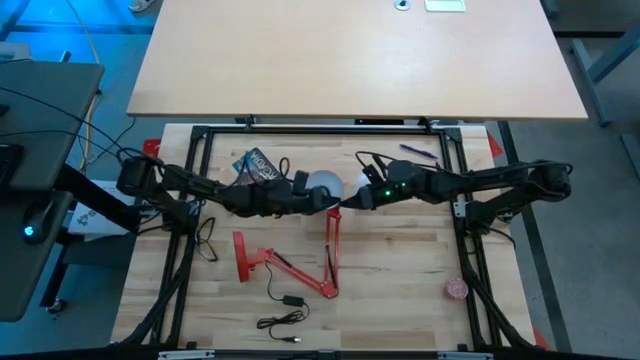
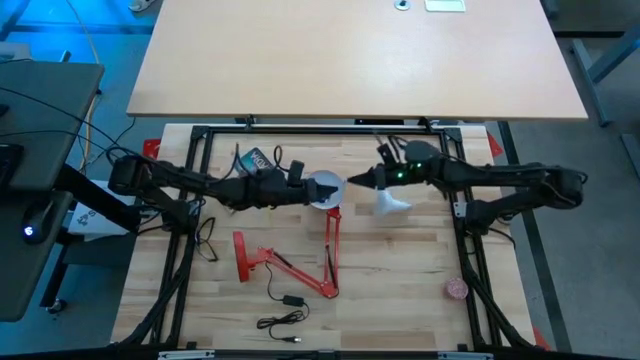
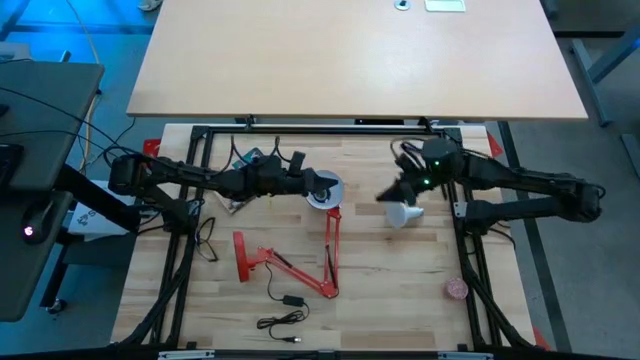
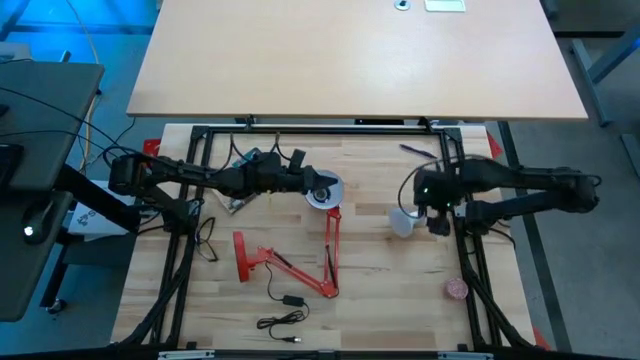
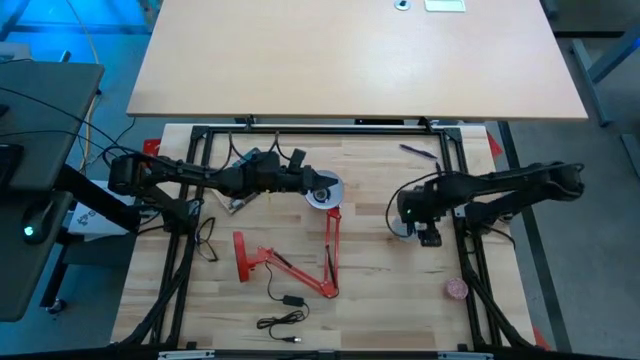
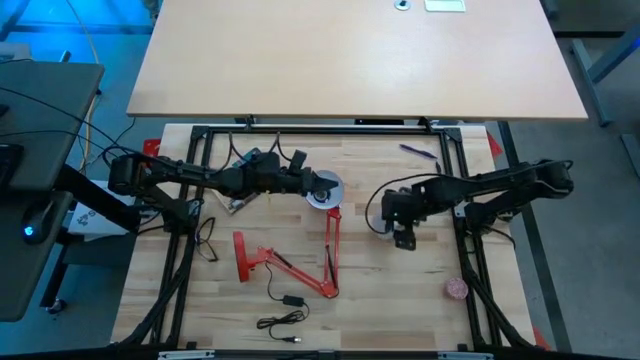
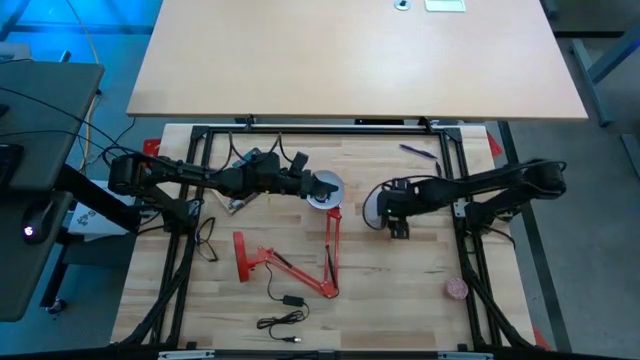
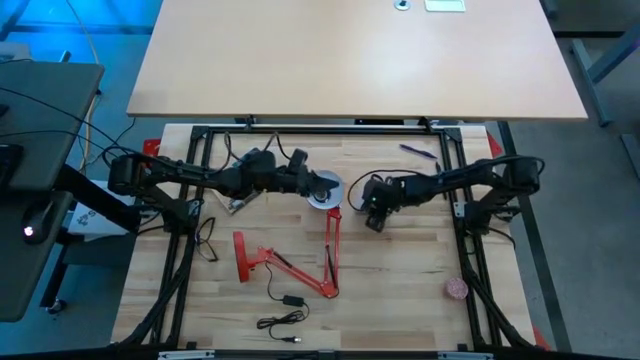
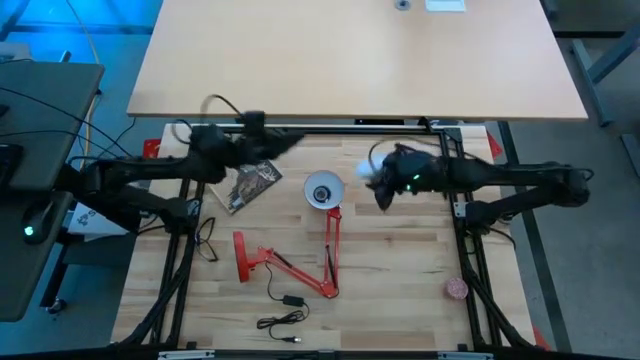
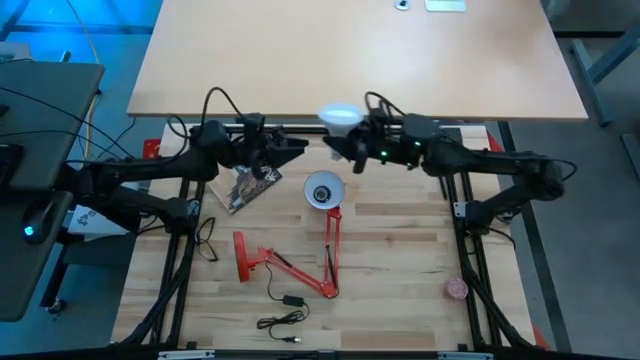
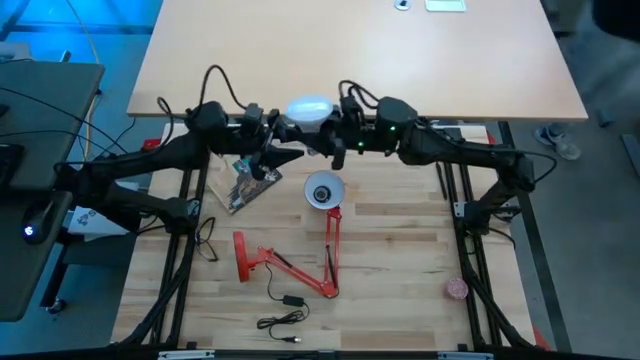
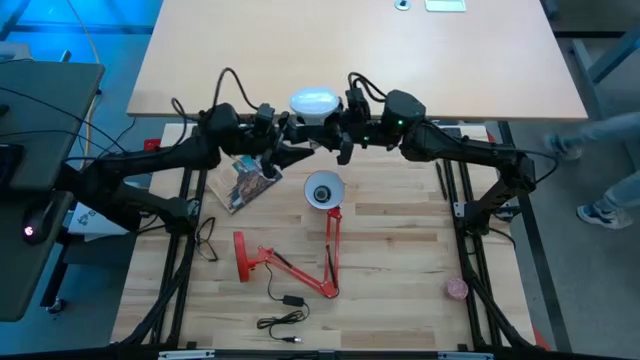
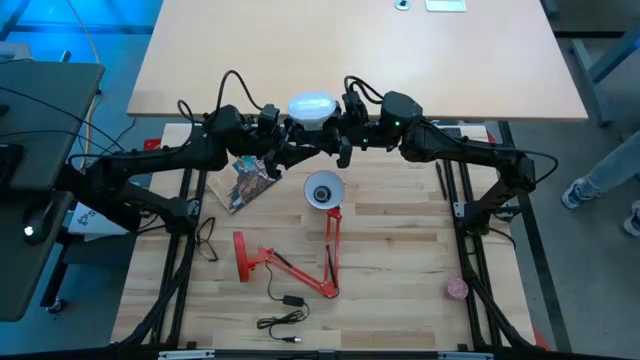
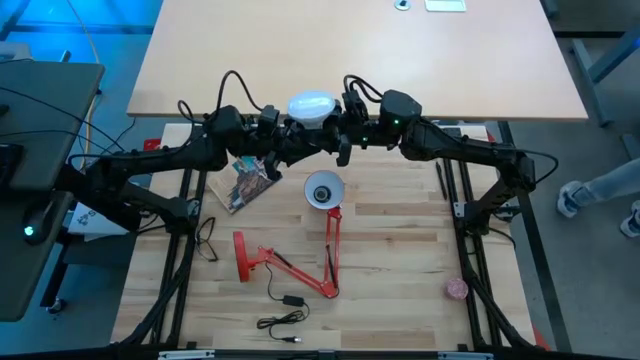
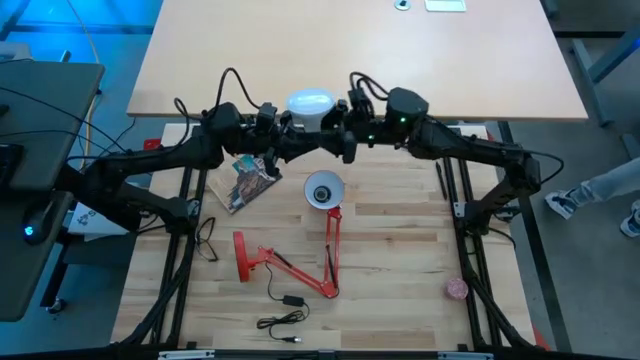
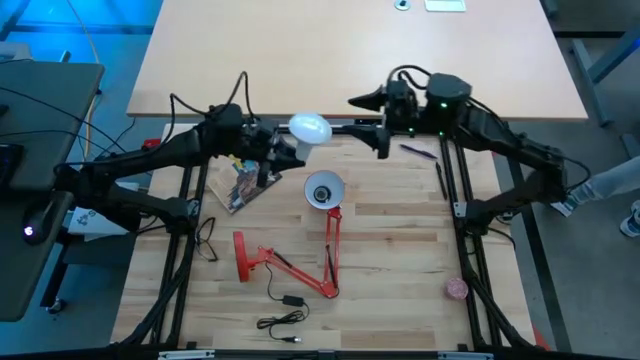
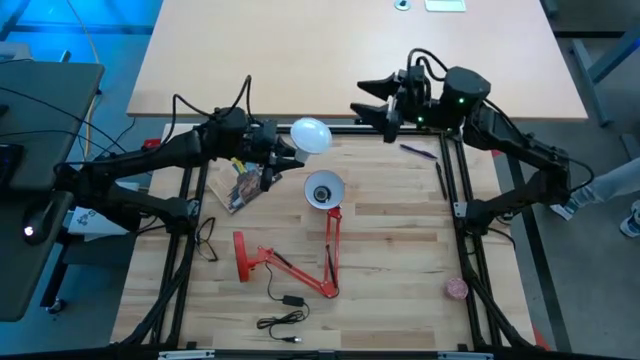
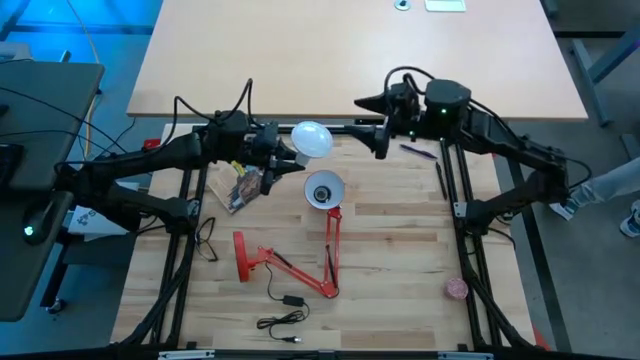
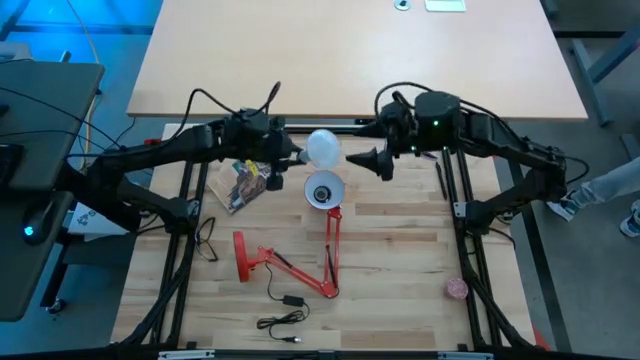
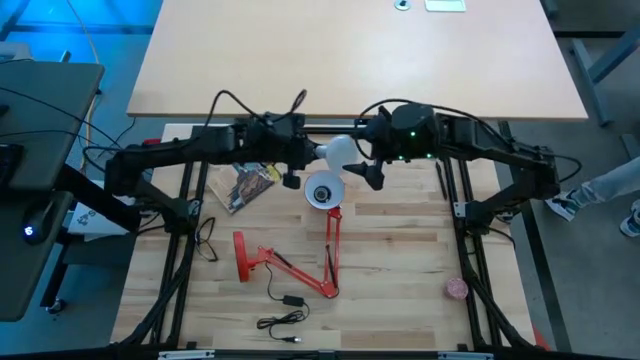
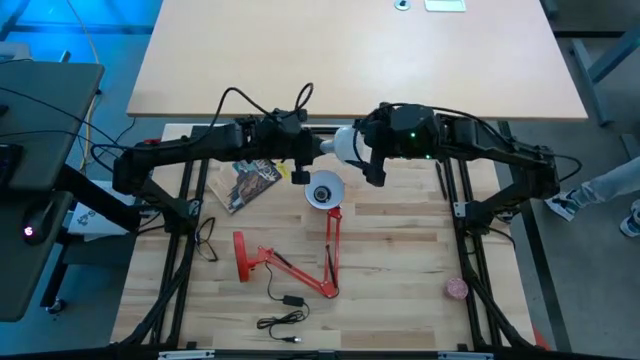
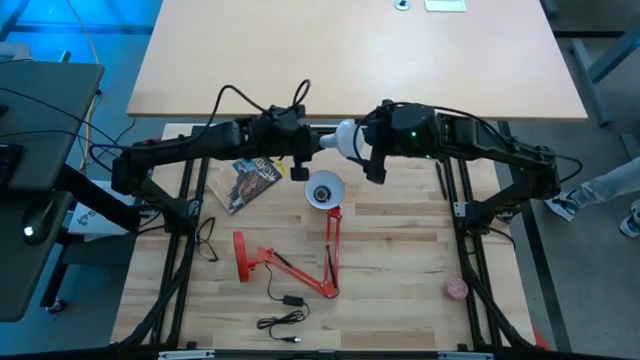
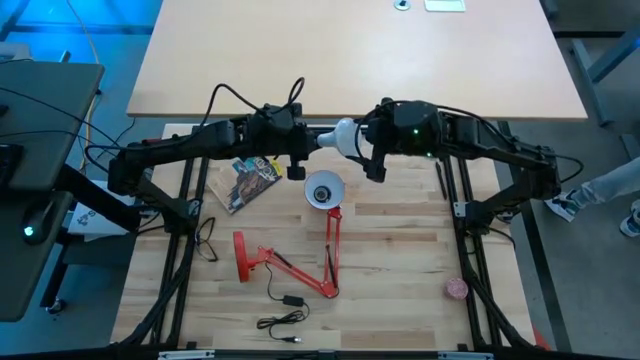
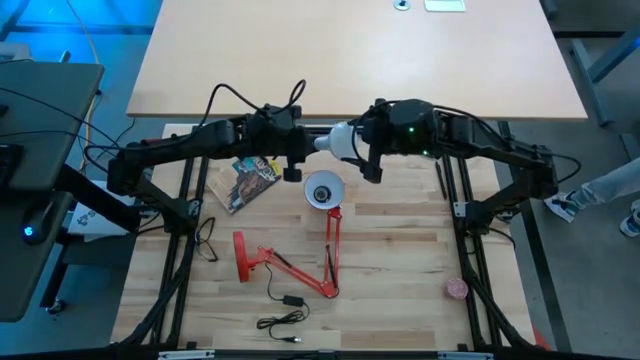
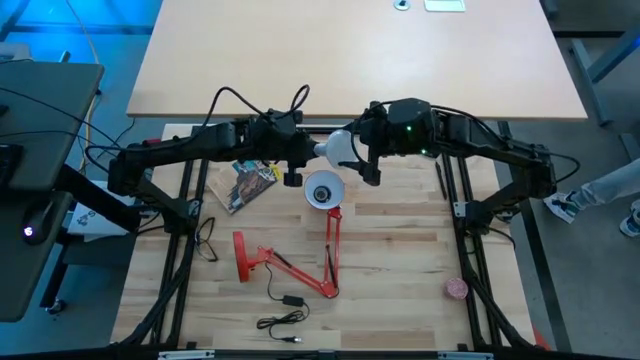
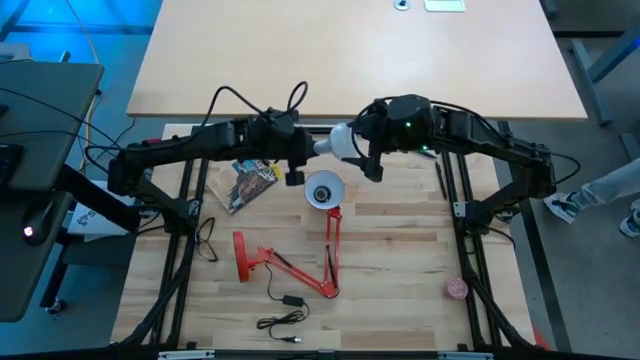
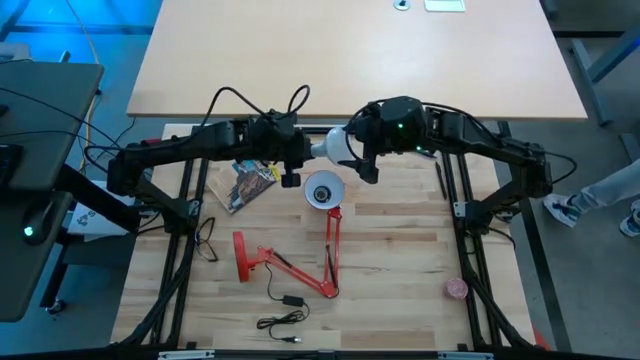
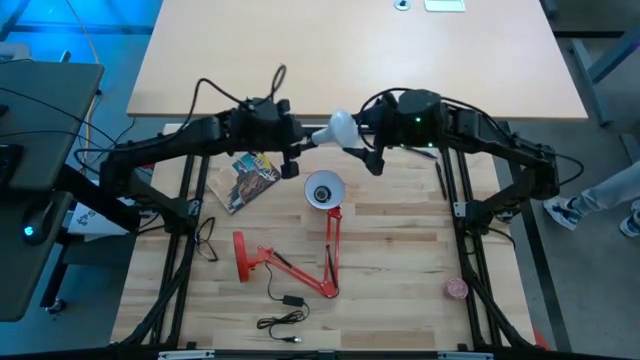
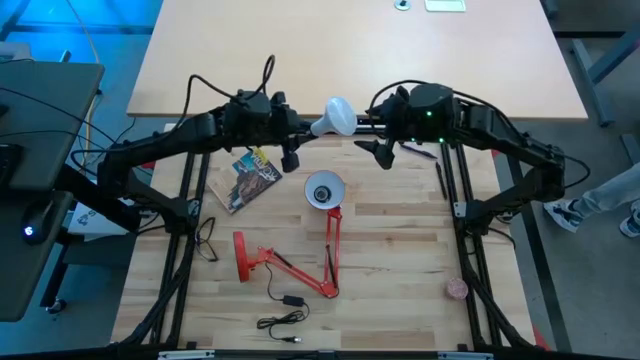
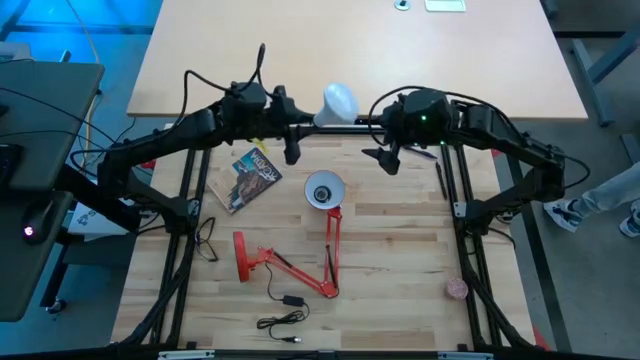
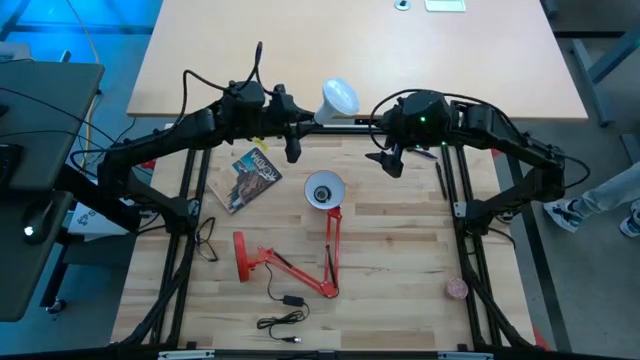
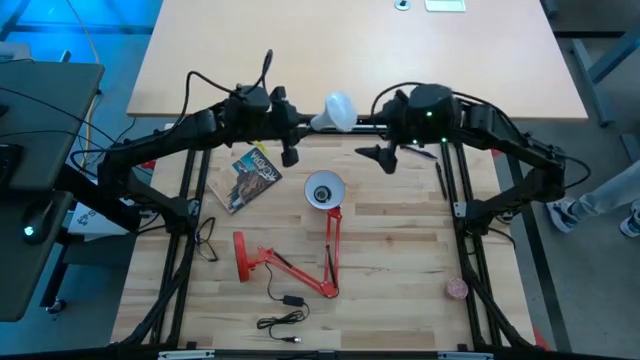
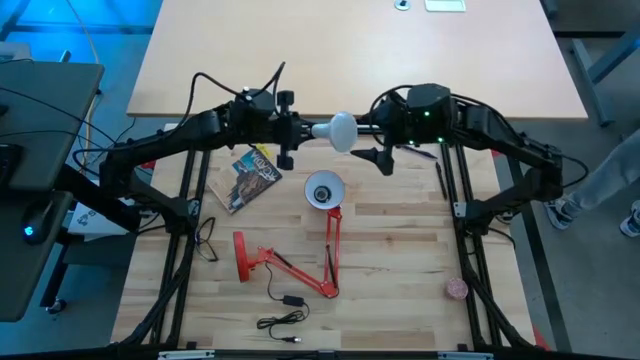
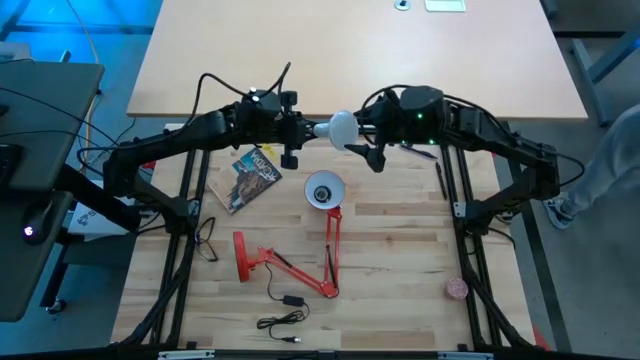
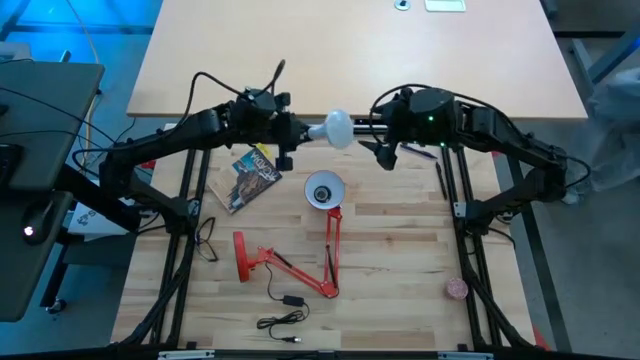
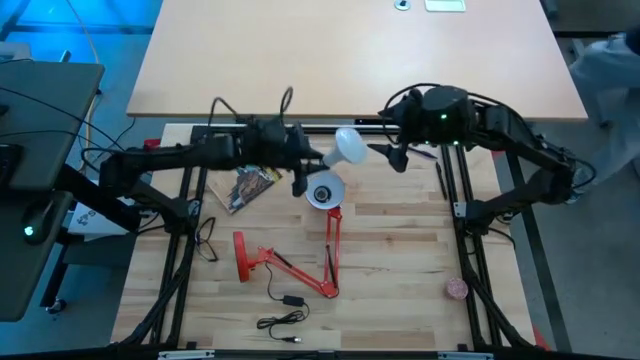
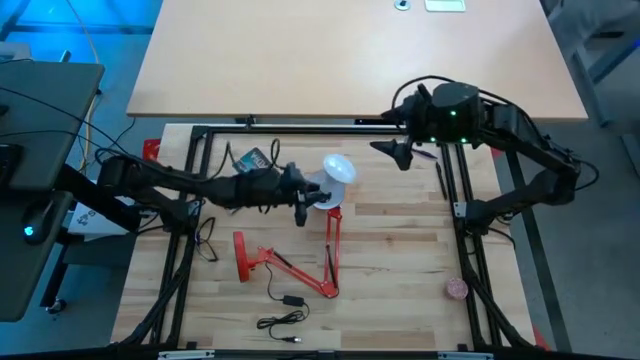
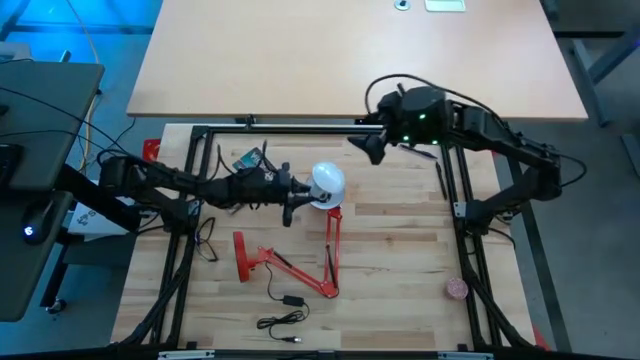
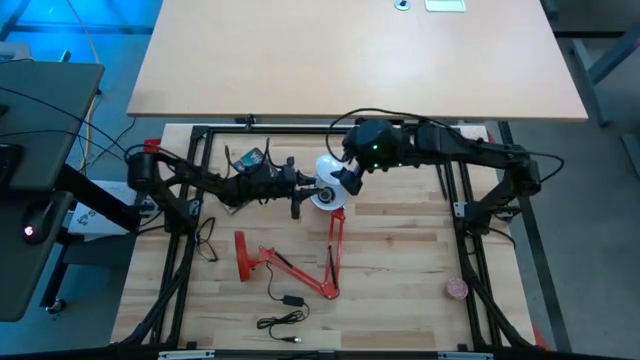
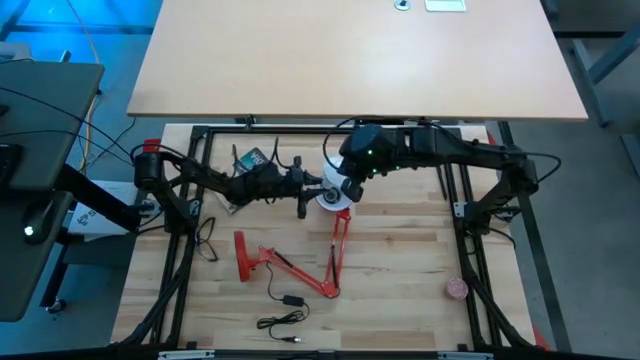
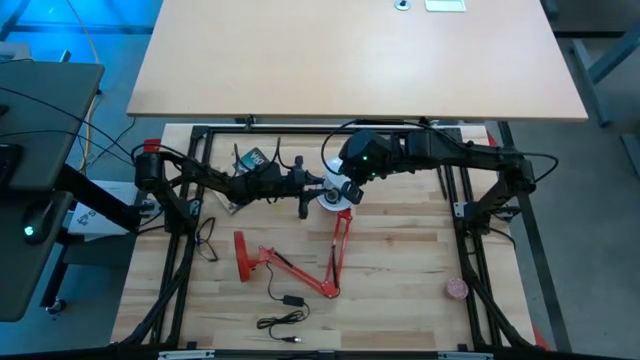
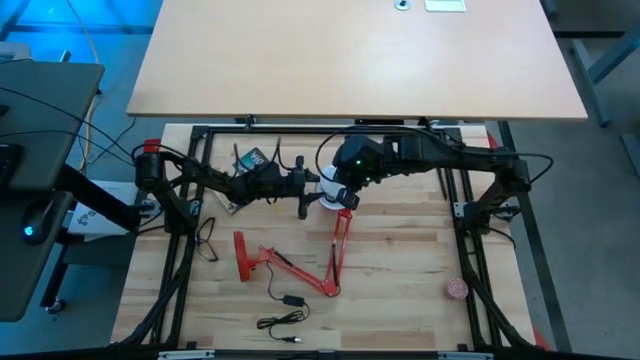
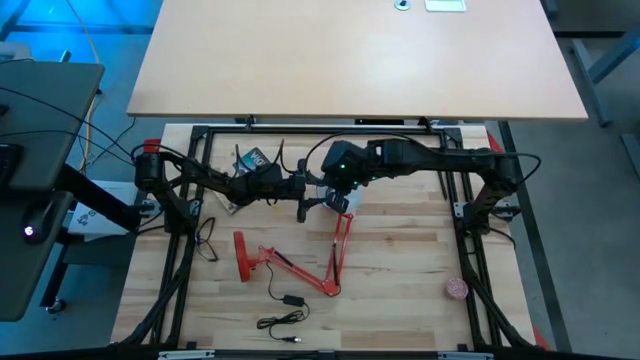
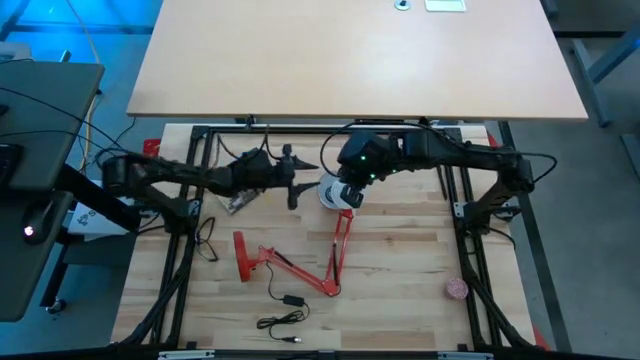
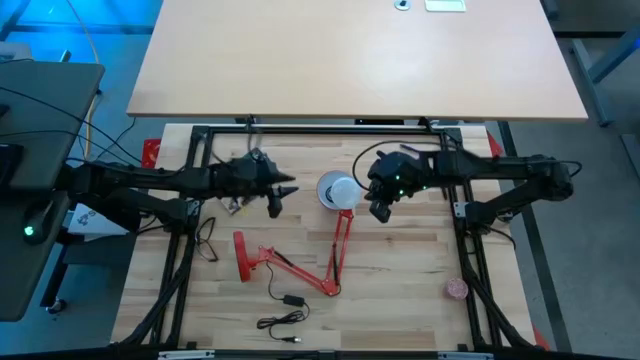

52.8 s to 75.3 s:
Task: Screw lightbulb
Insert the lightbulb into the red lamp
